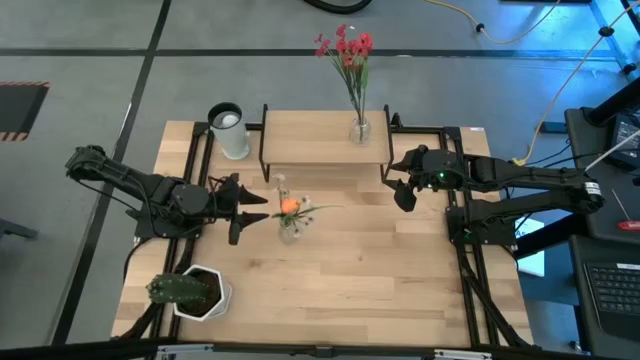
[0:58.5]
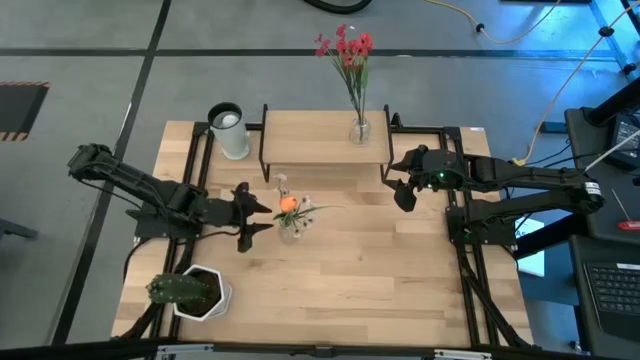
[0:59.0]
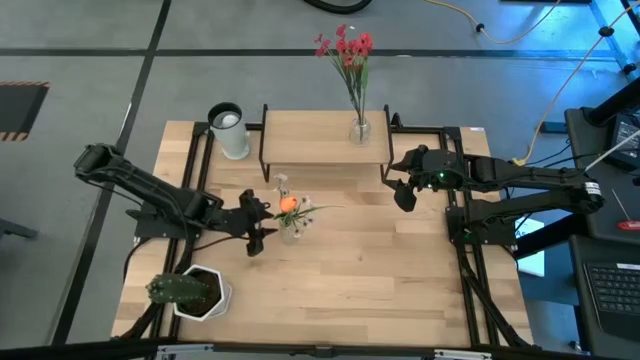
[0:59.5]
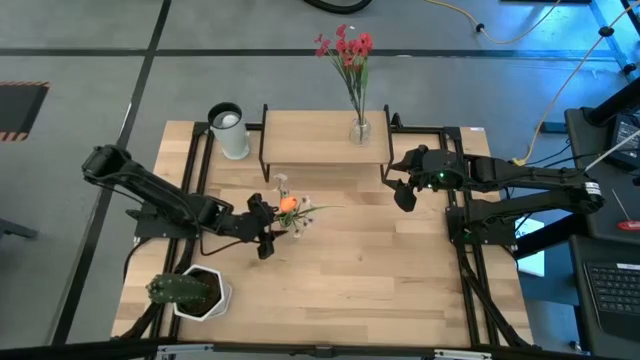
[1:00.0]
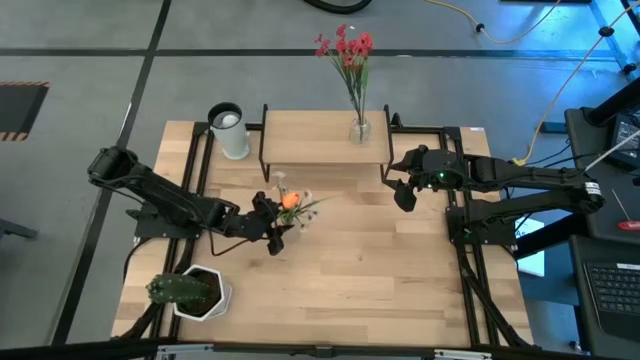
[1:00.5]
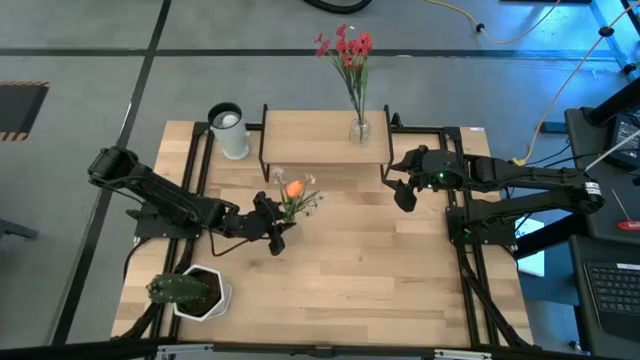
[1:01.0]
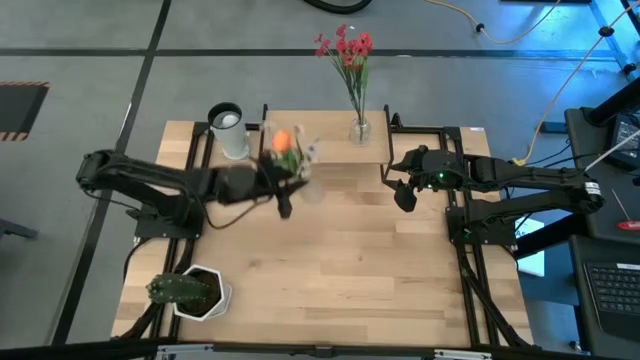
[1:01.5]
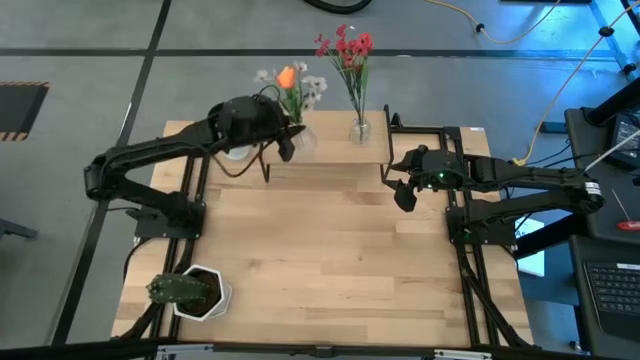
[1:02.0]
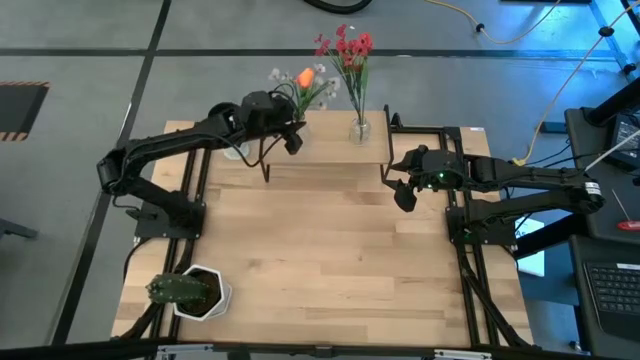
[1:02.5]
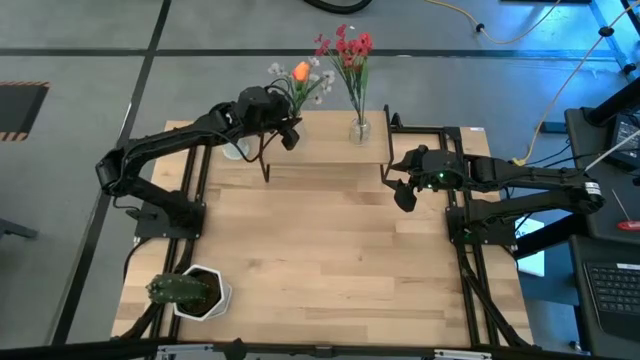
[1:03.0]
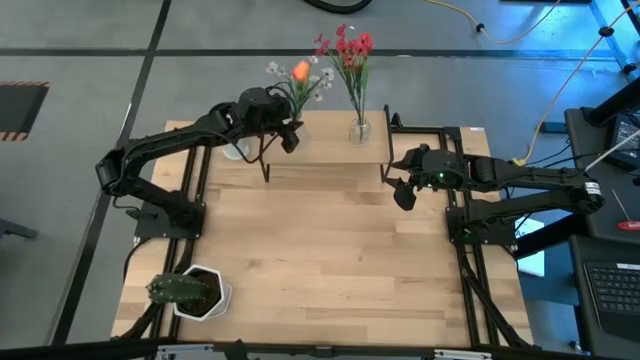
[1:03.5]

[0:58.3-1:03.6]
Task: Pick and place flowers into a vace then onto a shelf
Put the transparent vase on the shelf

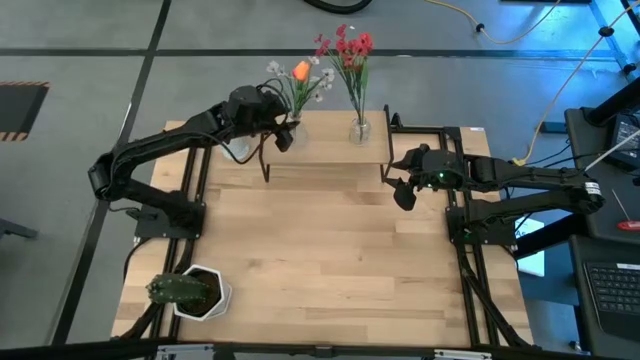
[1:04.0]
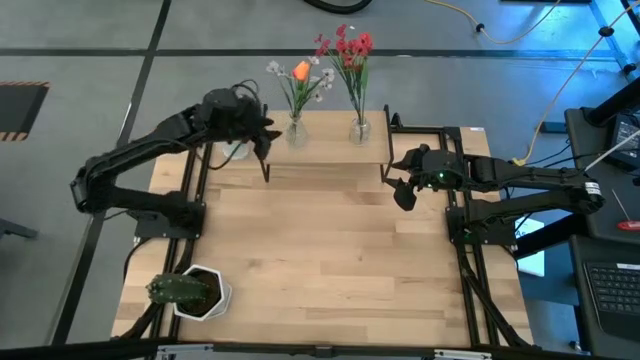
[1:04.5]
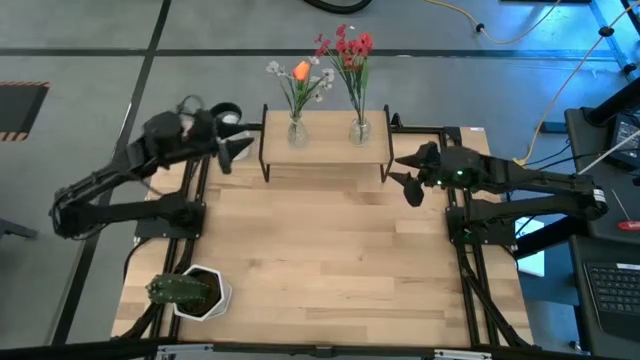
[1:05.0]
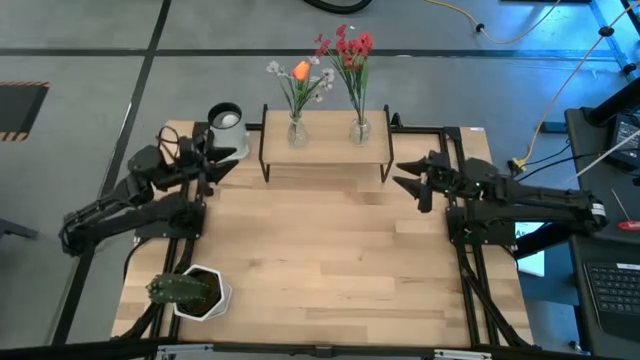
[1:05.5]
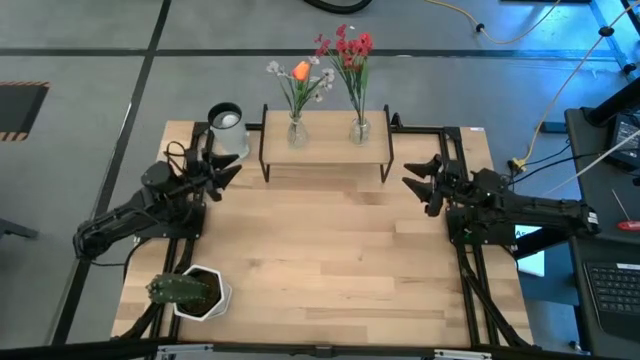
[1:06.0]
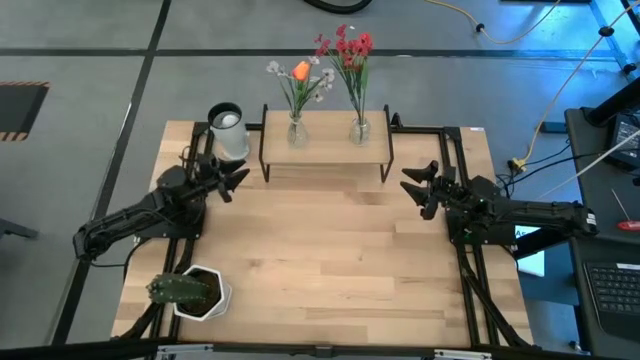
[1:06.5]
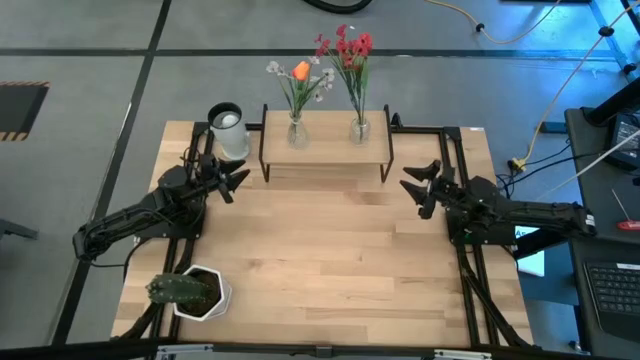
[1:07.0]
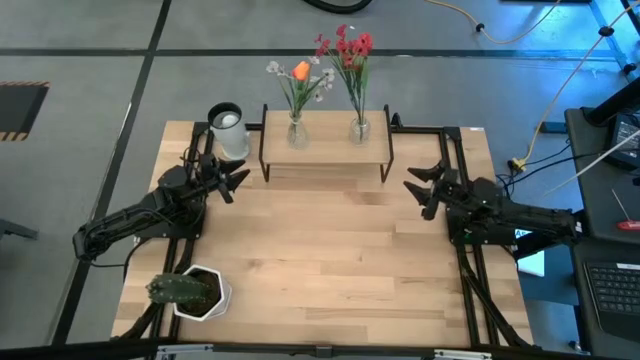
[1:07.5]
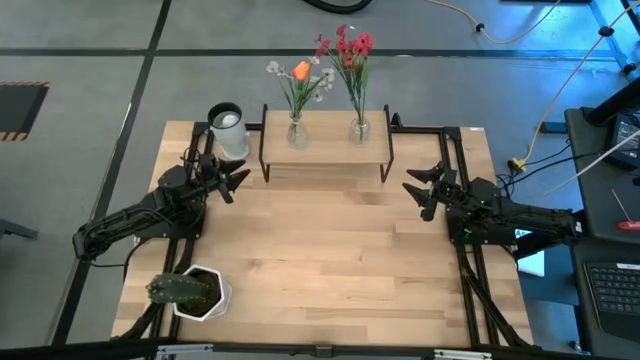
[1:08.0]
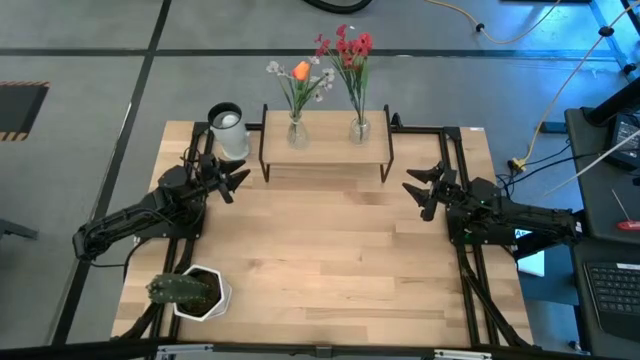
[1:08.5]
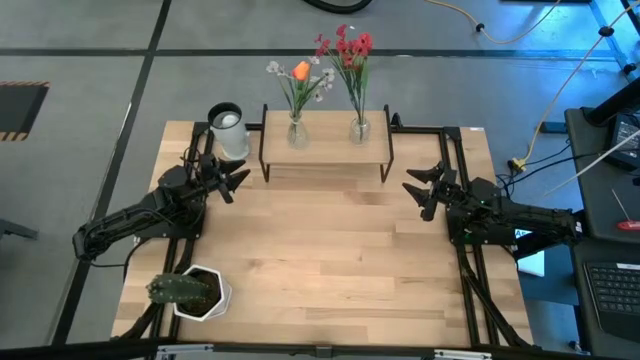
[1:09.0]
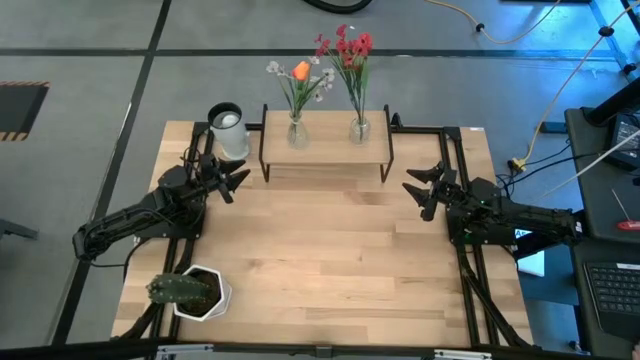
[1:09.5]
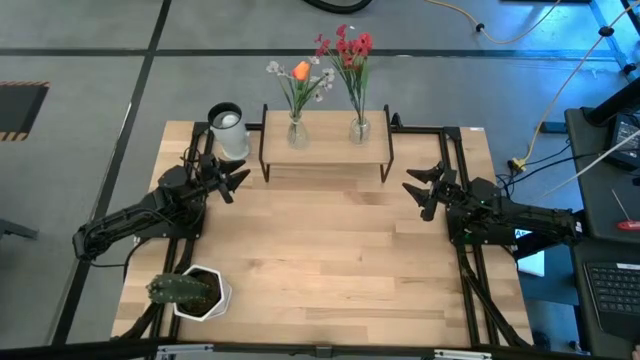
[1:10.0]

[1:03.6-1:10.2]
Return to Home Position

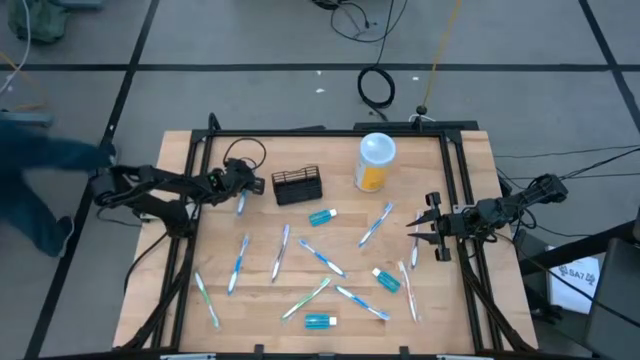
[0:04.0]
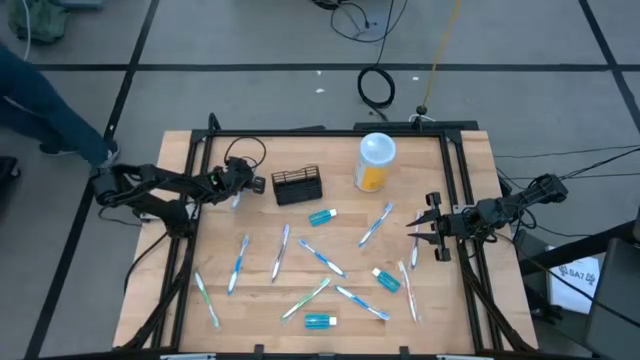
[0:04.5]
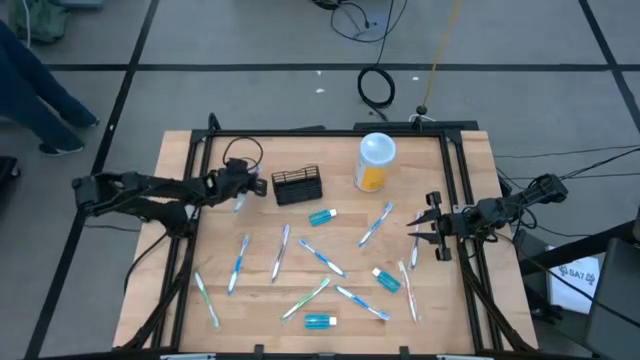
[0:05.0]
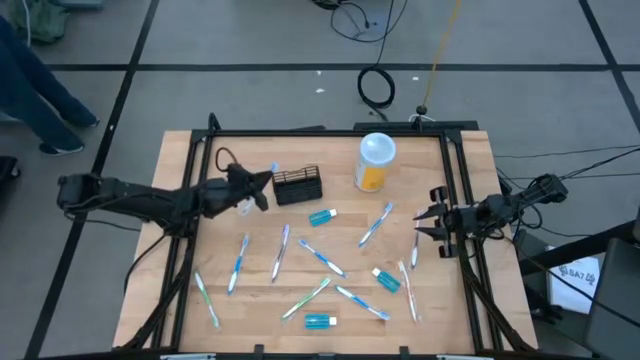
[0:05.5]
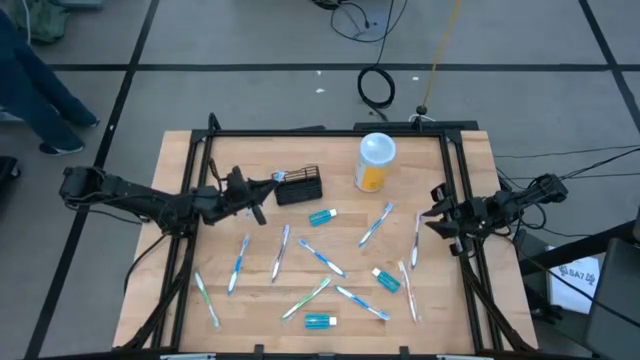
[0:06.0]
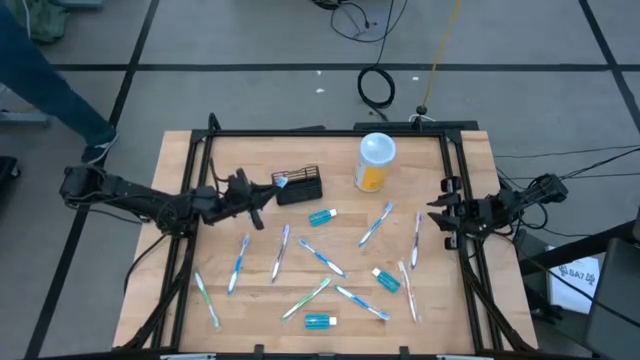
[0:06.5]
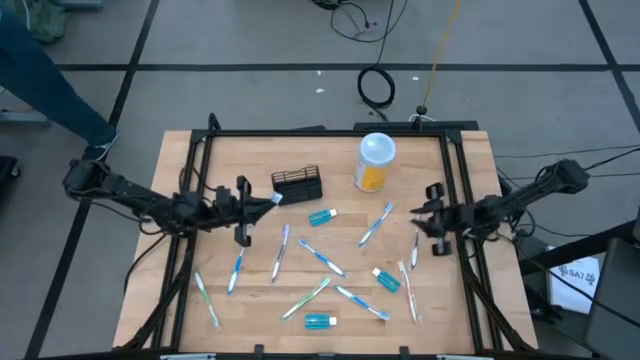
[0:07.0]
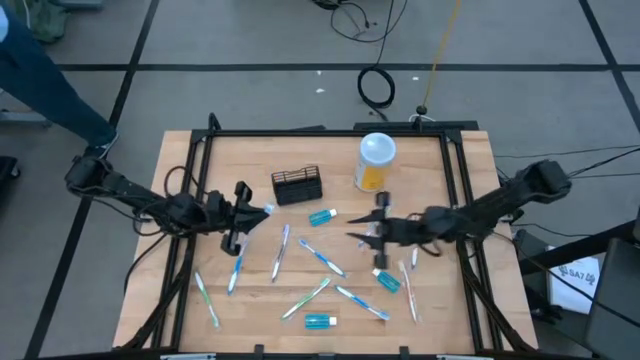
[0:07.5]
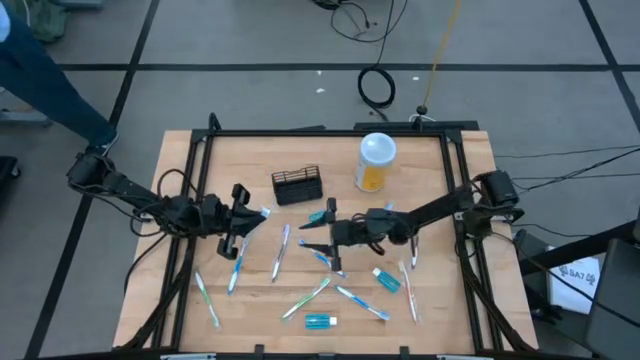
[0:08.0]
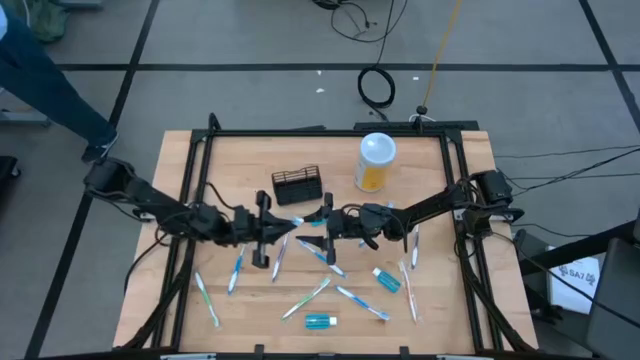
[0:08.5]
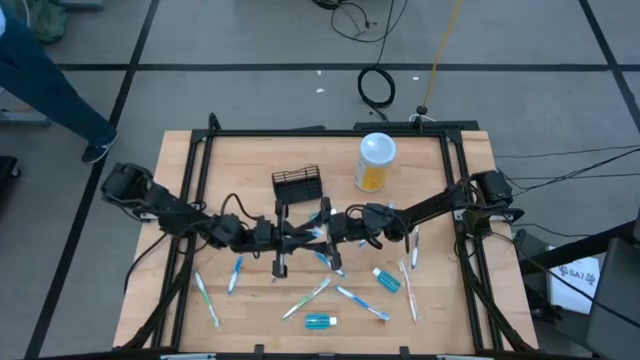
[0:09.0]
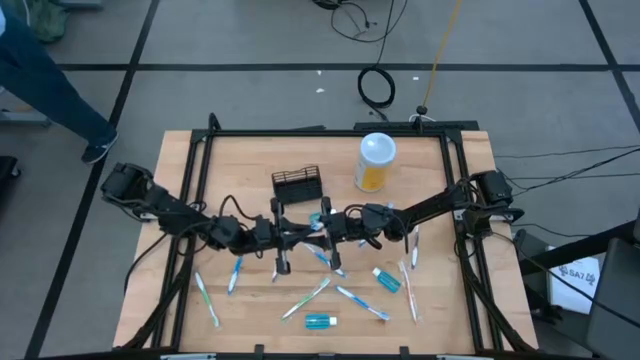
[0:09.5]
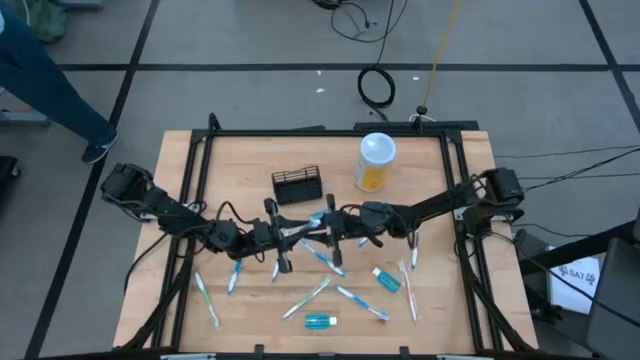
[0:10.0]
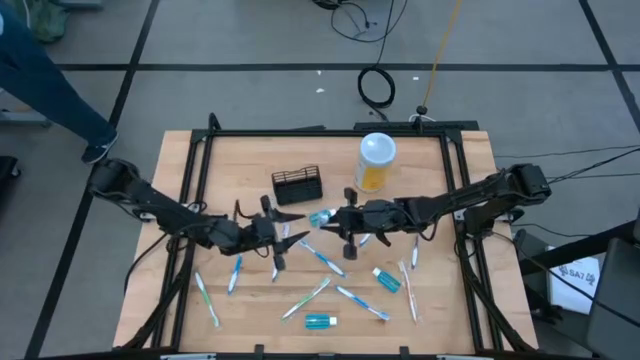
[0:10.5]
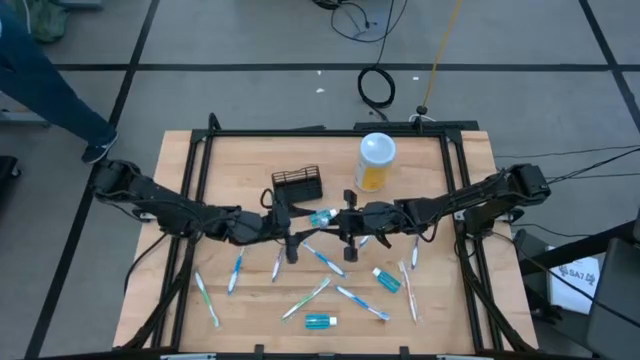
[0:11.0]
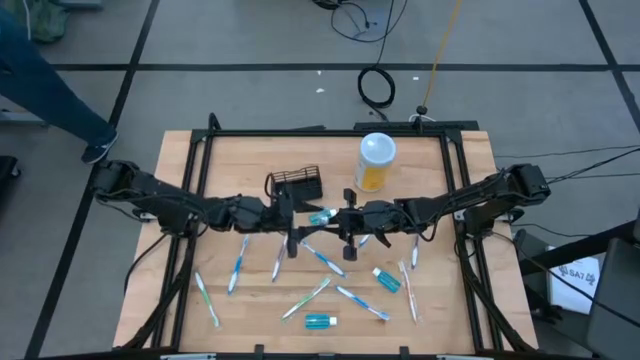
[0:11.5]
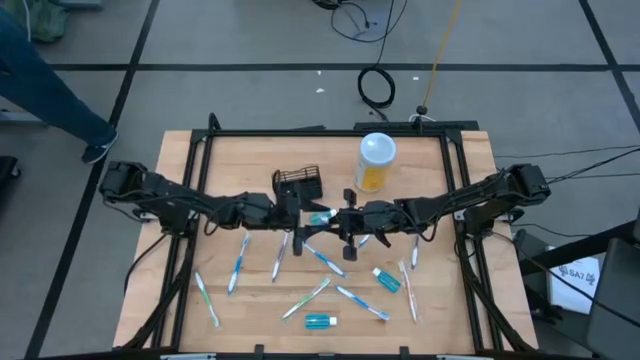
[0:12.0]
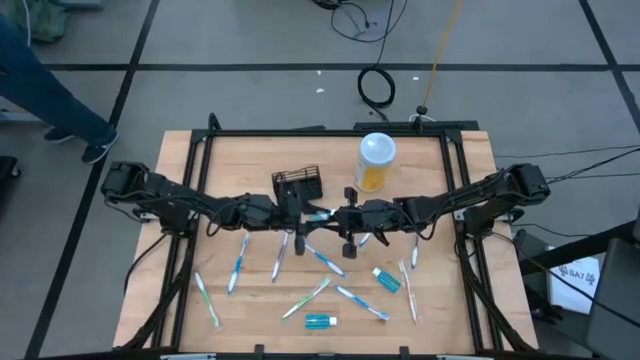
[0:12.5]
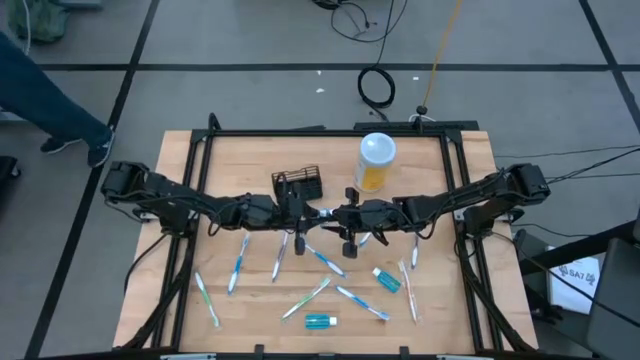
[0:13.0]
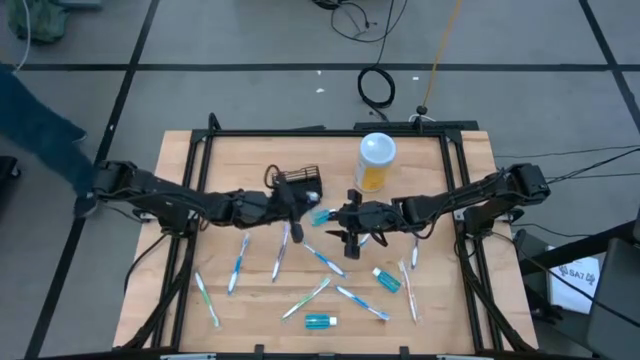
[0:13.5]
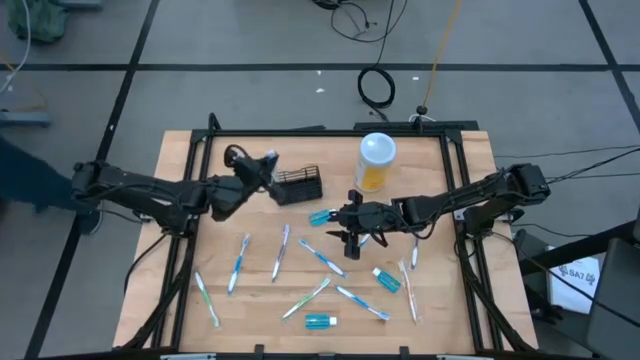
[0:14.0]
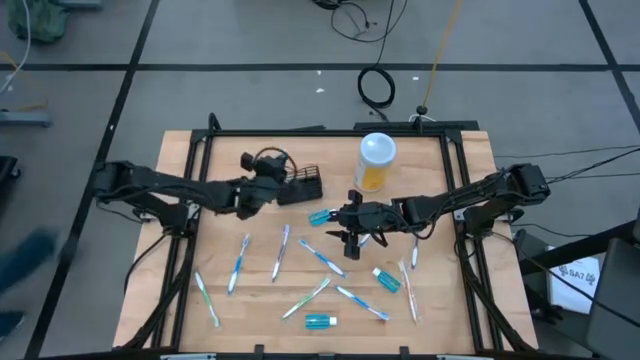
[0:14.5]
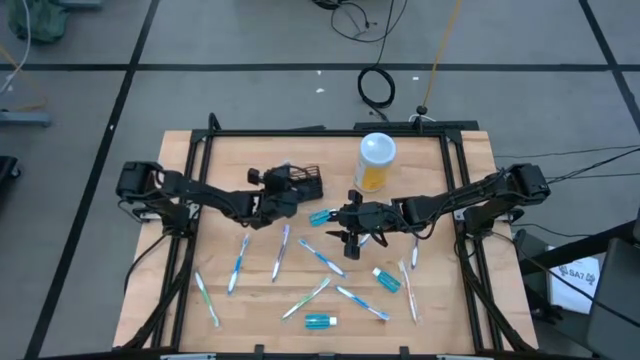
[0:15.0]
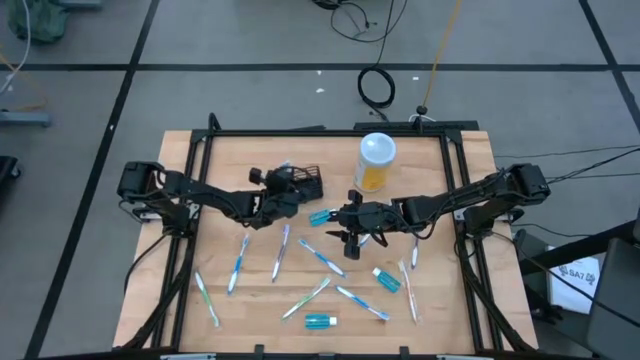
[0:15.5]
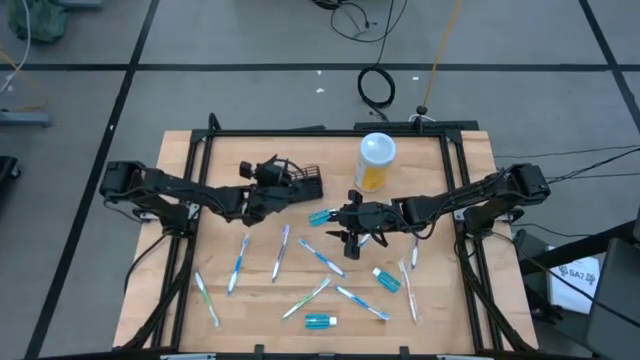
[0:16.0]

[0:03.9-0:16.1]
Task: Pick & Place toothbrushing station
Put the blue toothbrush into the black mesh organizer
